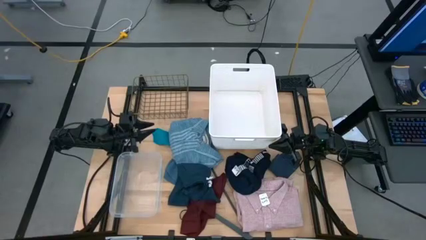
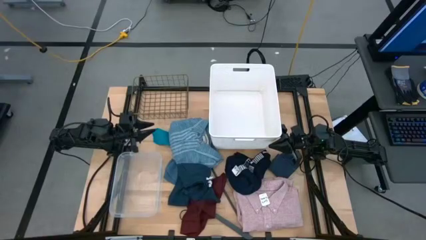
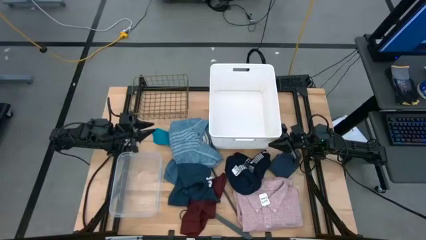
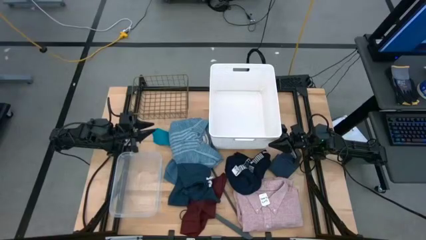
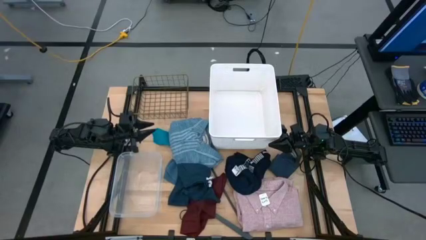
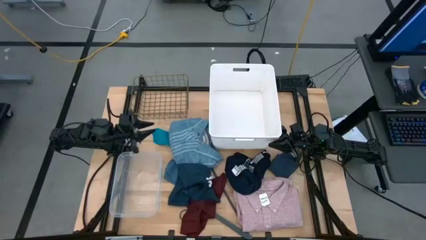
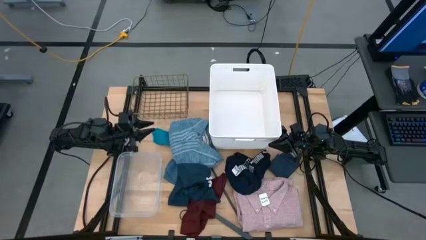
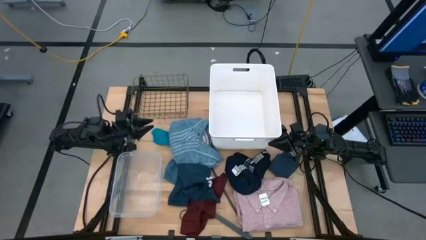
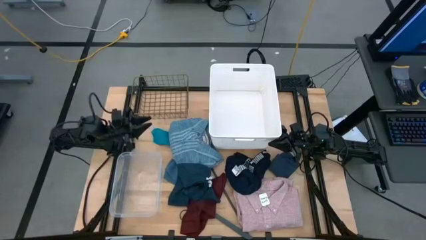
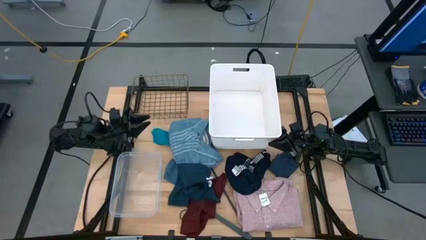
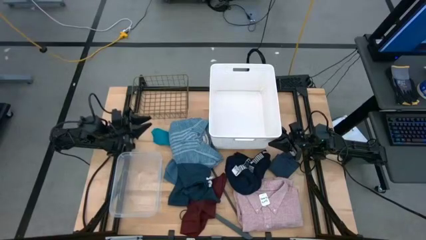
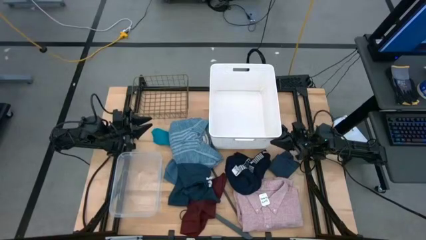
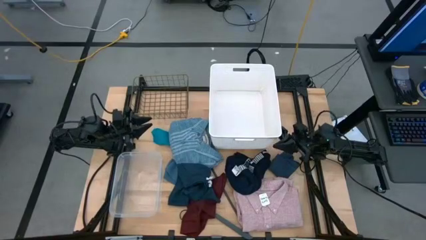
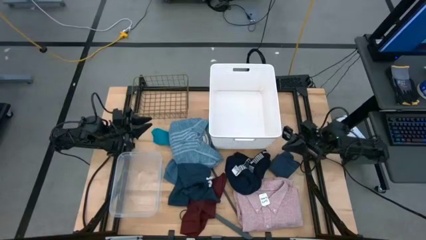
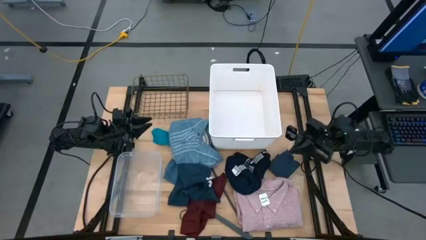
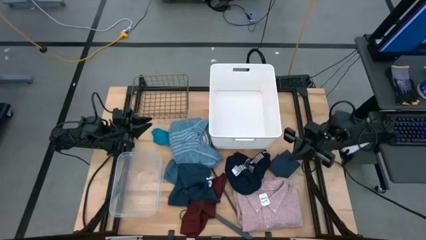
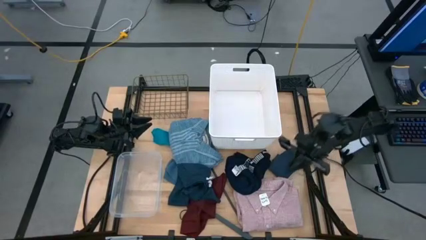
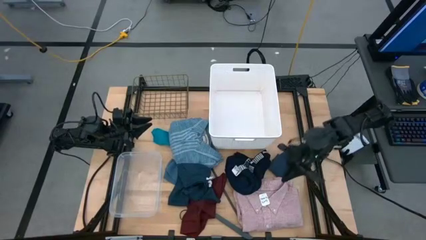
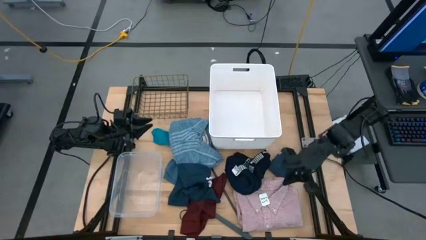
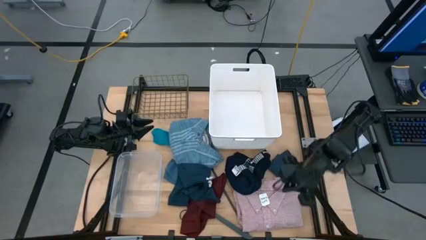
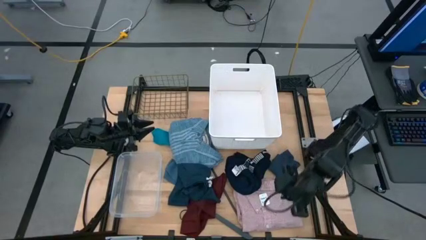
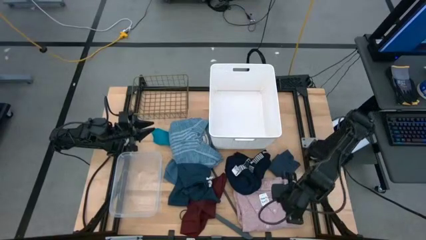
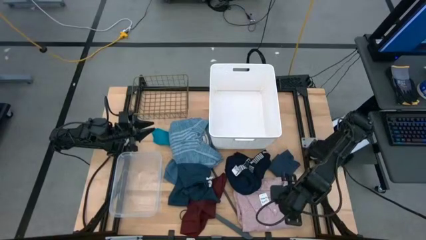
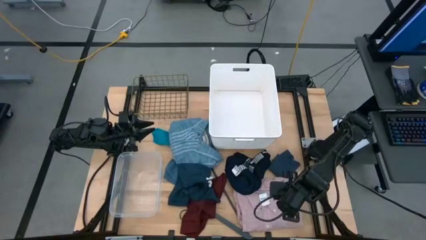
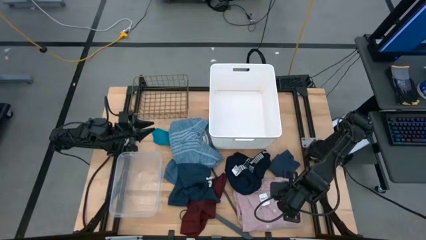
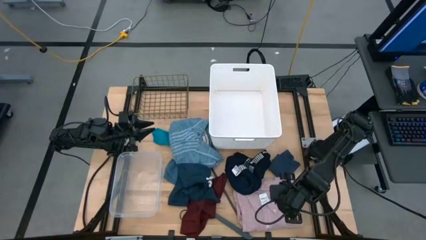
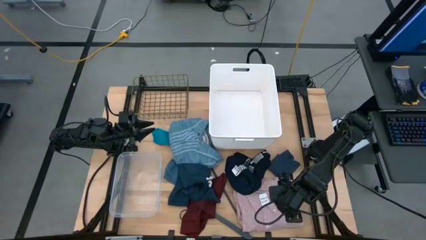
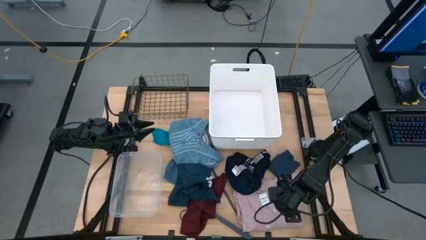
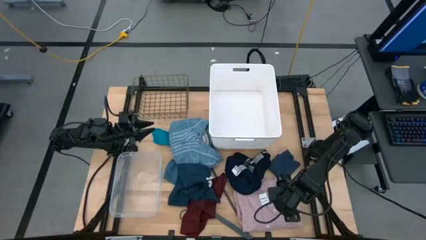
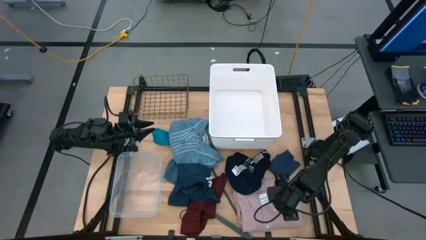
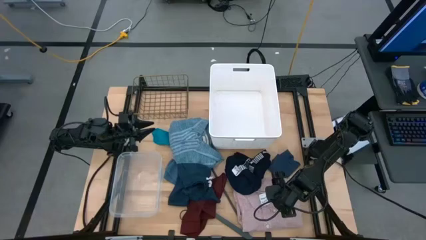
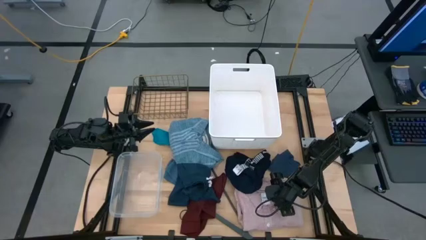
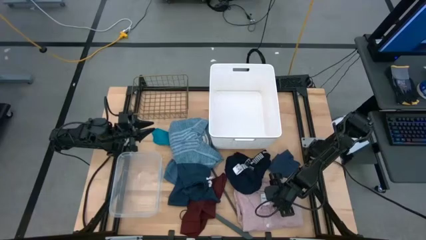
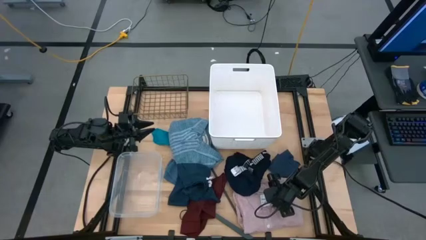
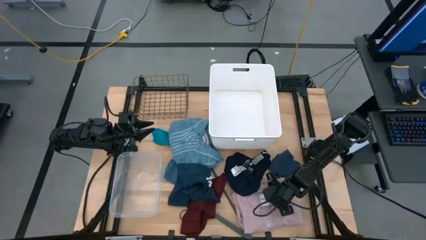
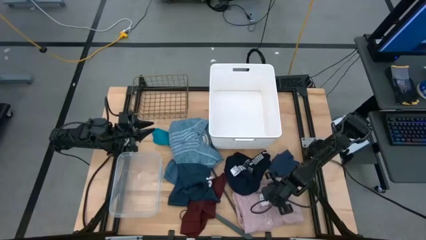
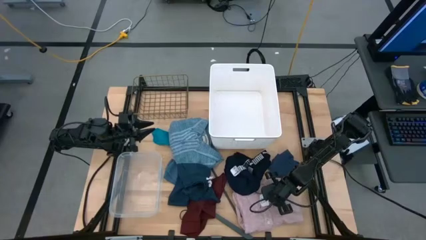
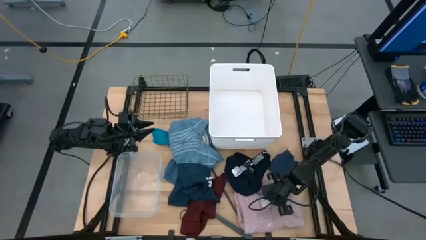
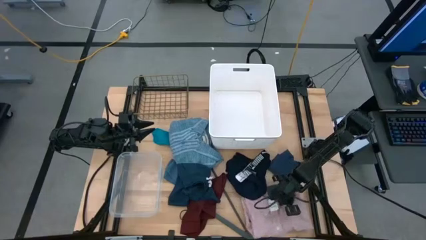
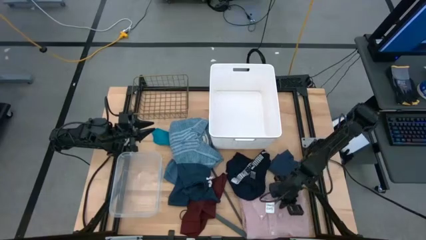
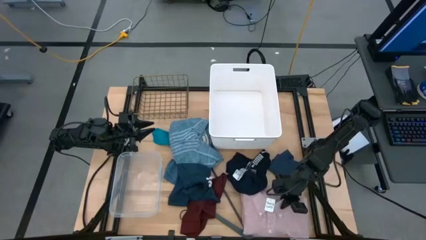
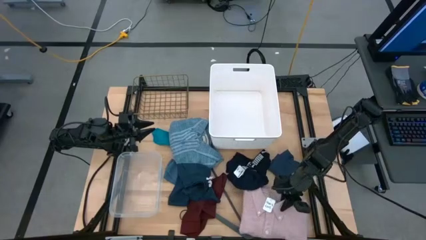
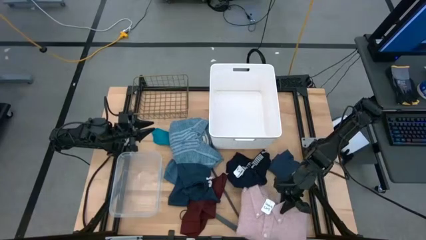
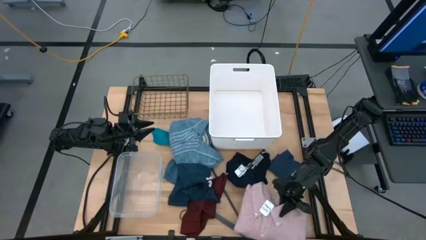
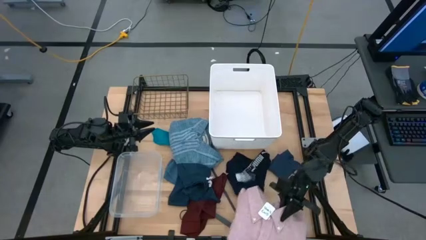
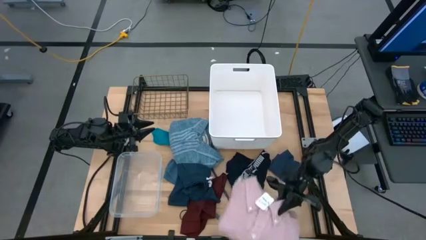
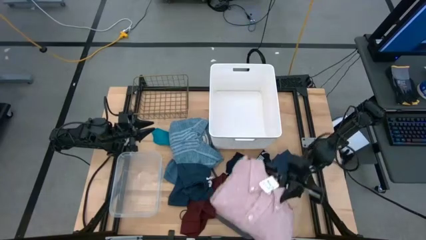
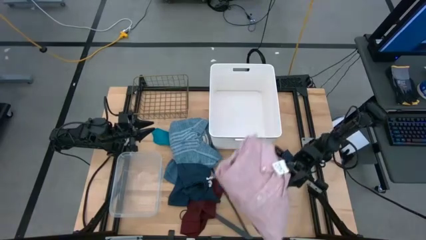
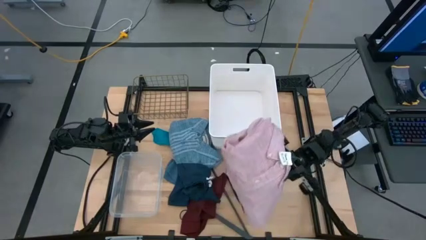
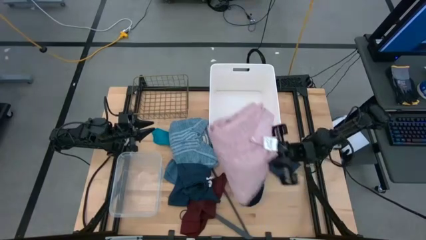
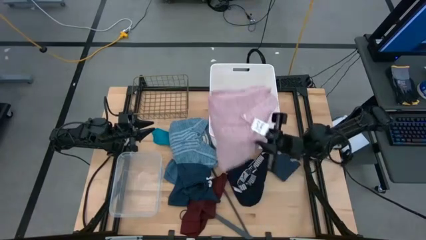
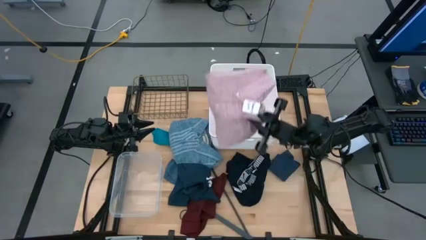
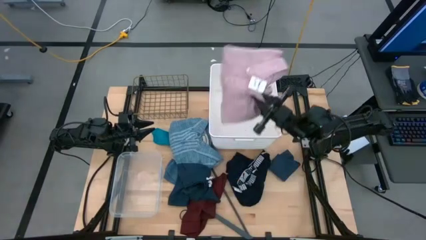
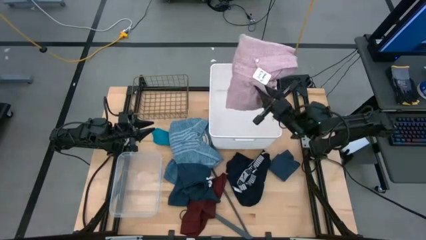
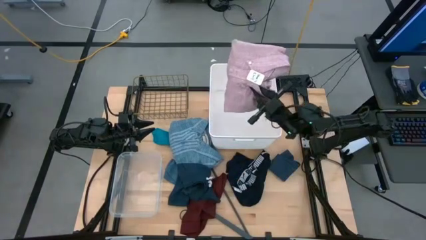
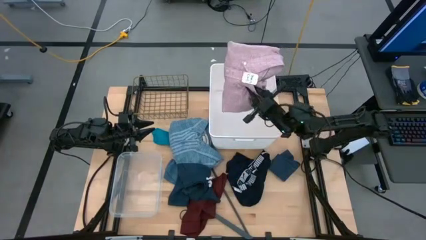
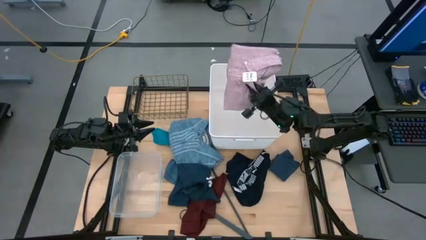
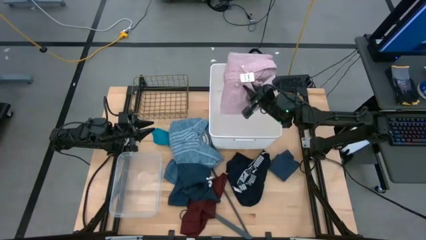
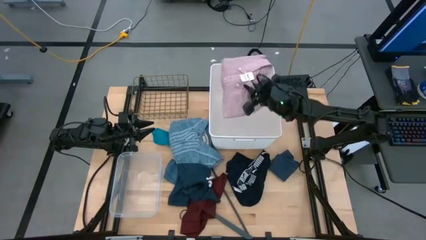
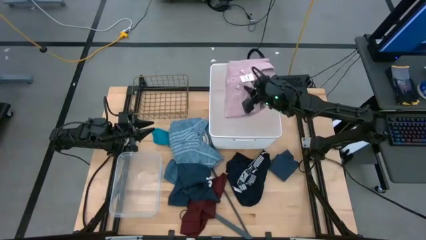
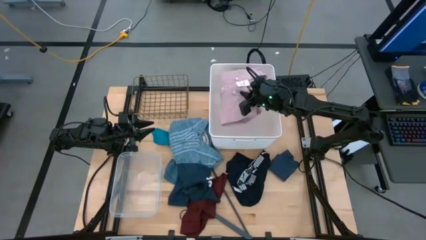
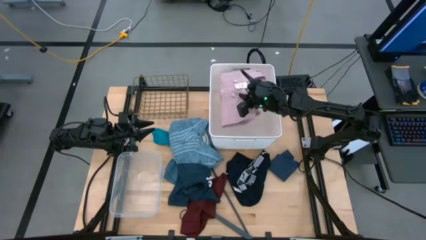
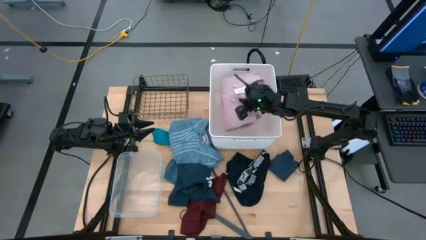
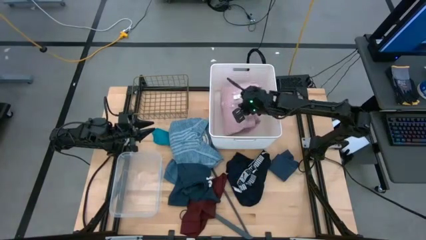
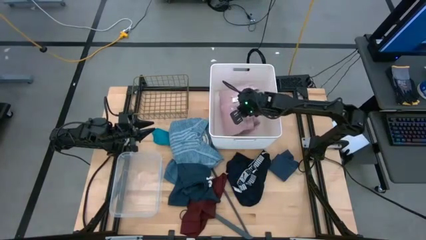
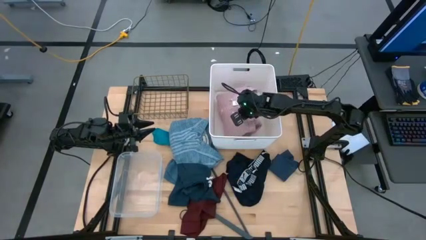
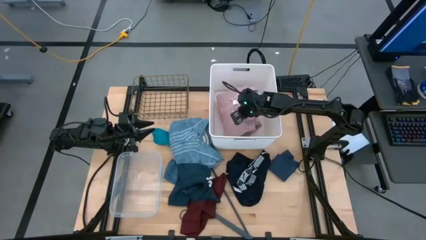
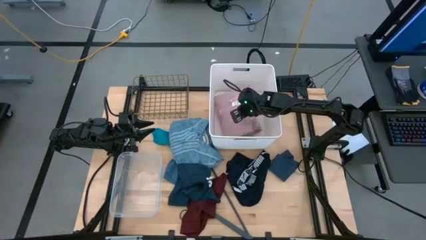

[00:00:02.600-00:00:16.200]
Task: Pick & Place Cloths
Put the pink shirt into the white bin

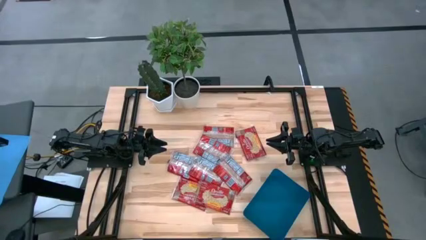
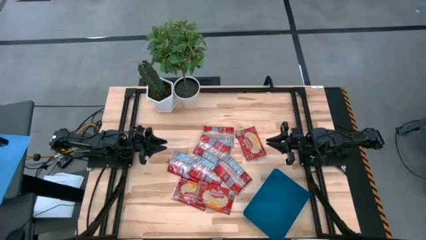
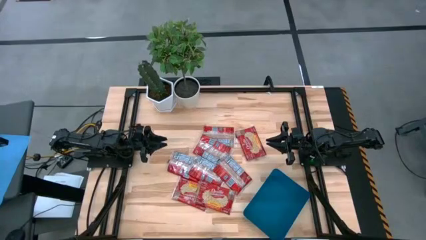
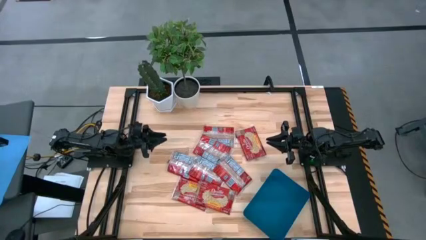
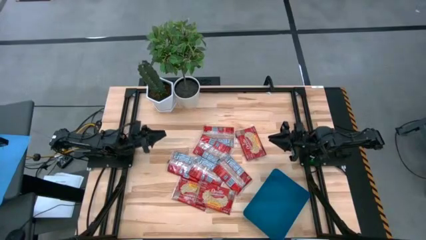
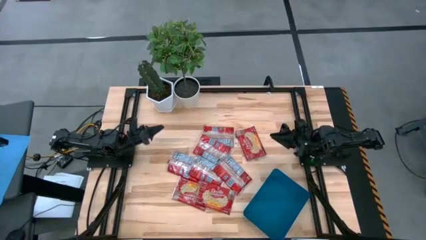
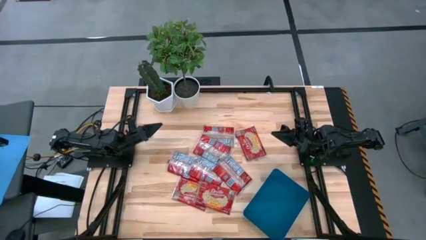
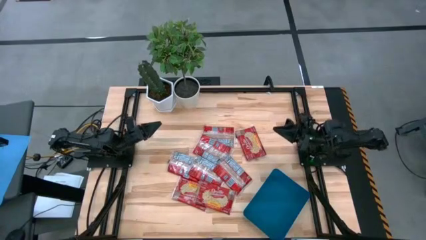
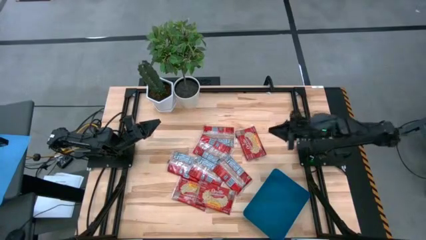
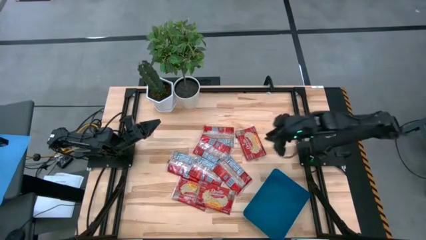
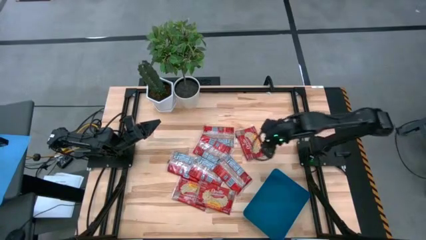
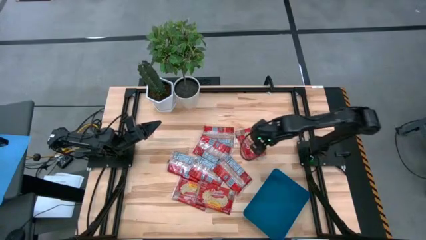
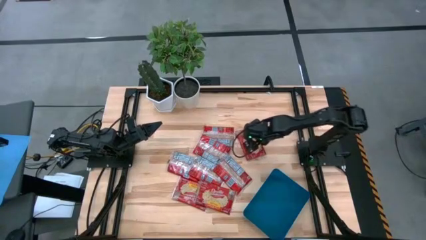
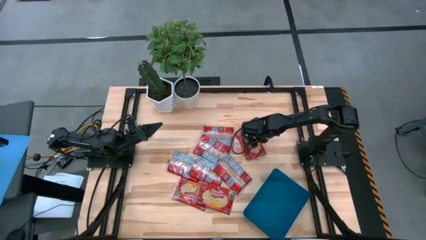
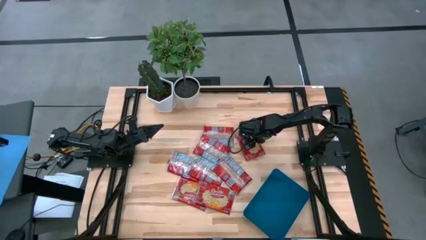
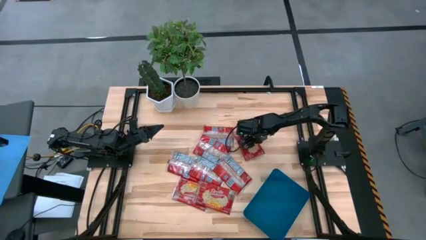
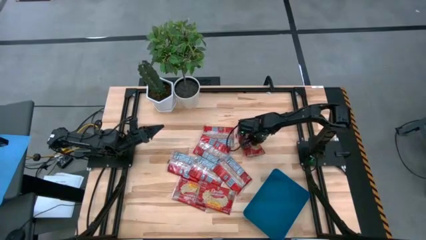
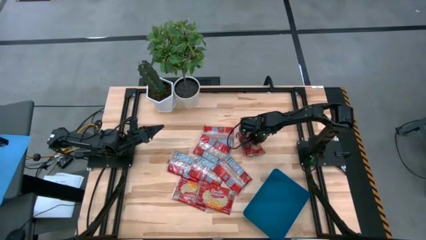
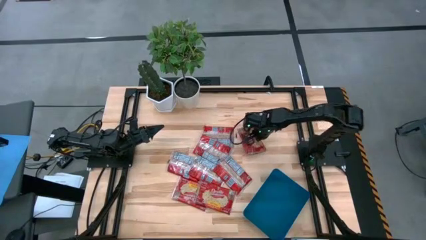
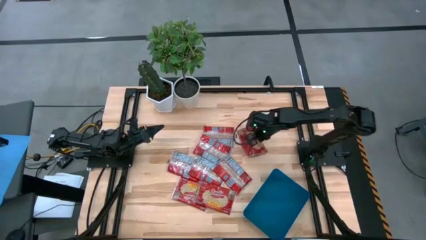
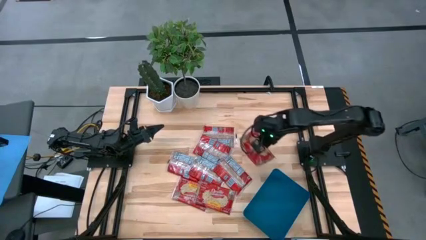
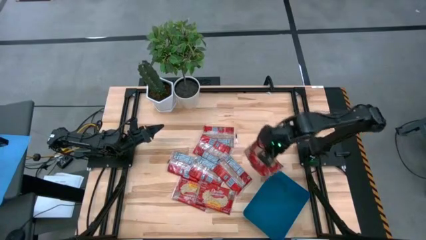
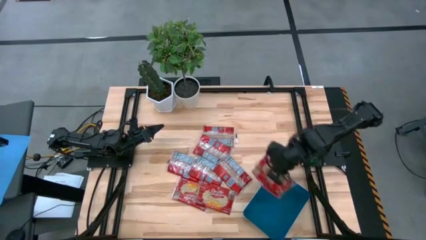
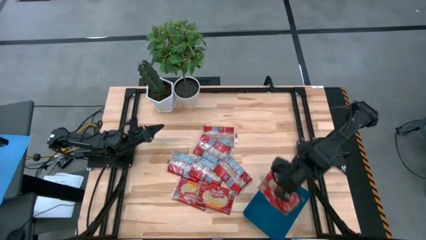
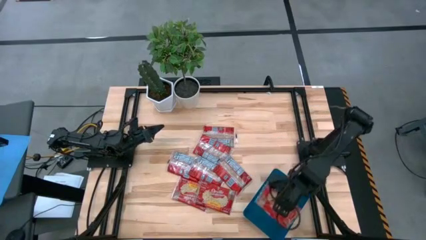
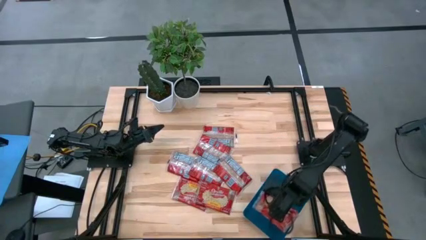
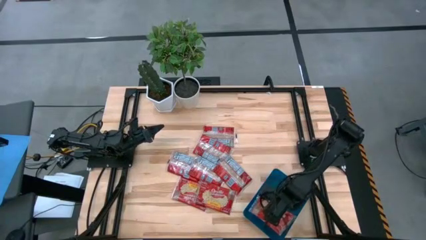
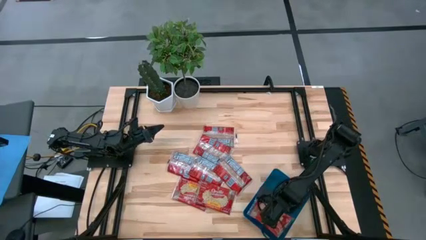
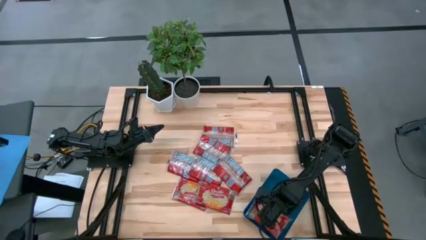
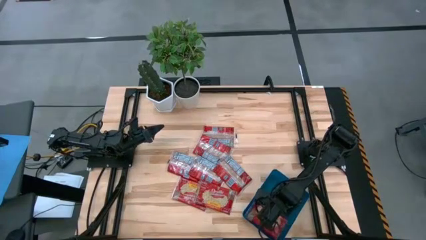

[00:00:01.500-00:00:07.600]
Task: Sort popcorn bags into baskets
Put the red popcorn bag into the blue bin
